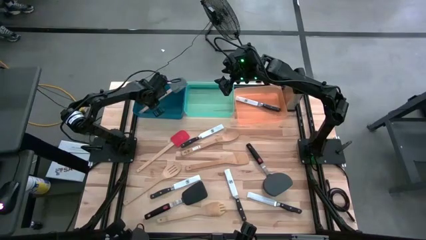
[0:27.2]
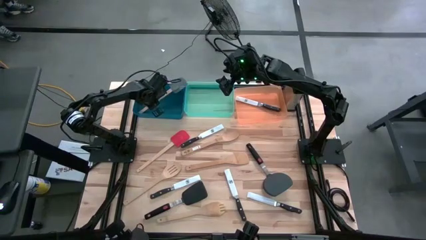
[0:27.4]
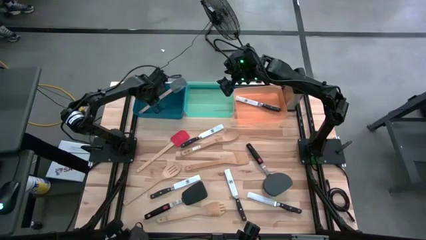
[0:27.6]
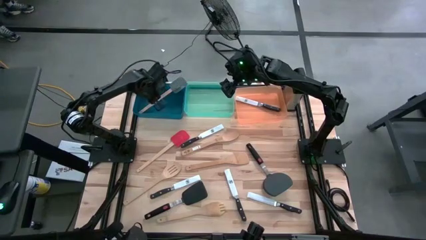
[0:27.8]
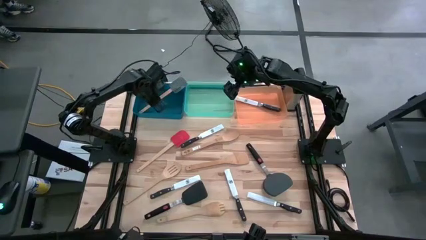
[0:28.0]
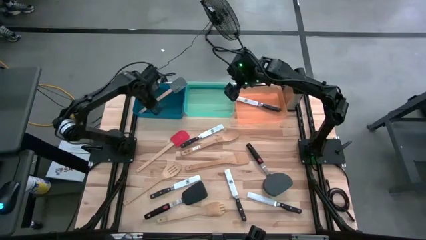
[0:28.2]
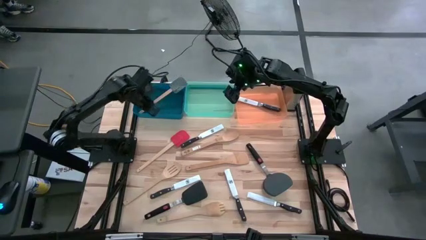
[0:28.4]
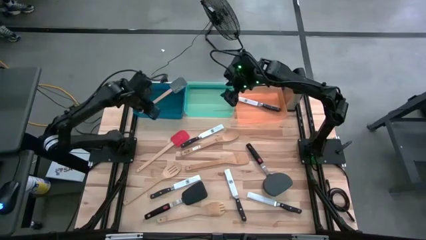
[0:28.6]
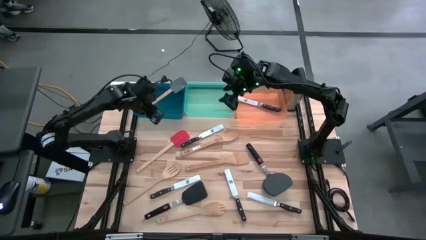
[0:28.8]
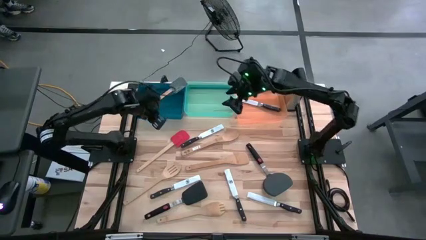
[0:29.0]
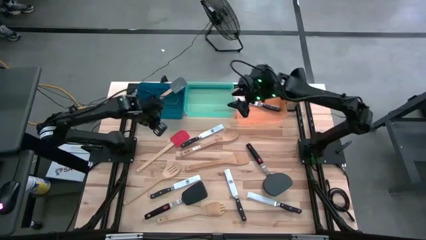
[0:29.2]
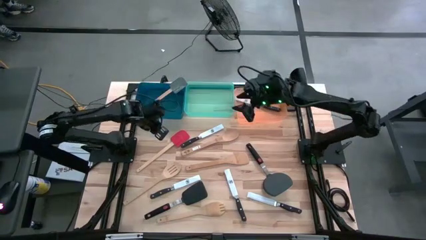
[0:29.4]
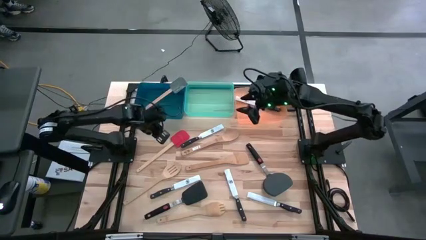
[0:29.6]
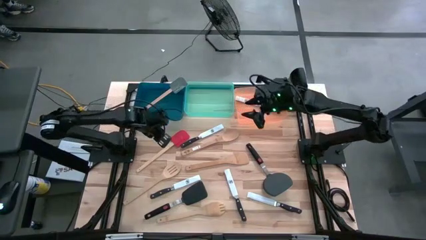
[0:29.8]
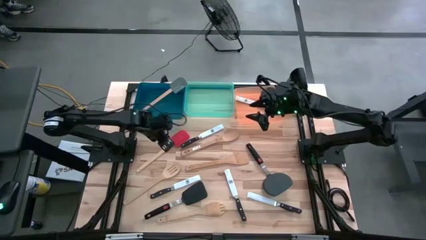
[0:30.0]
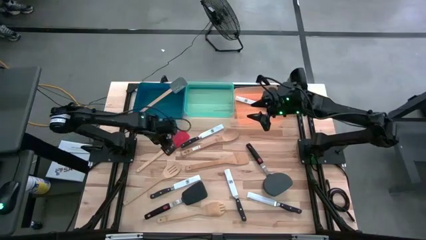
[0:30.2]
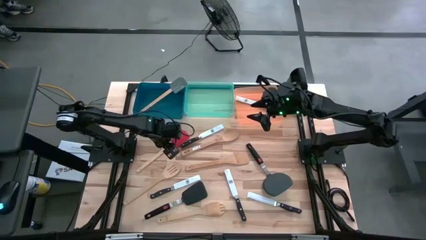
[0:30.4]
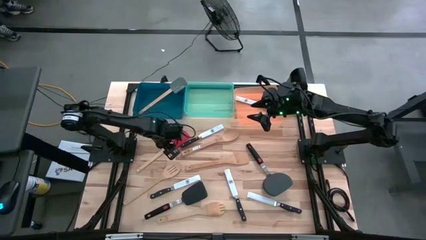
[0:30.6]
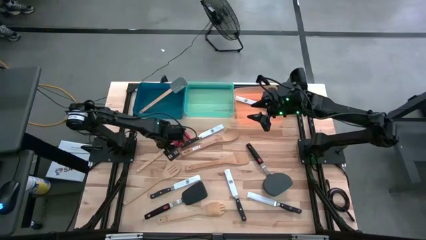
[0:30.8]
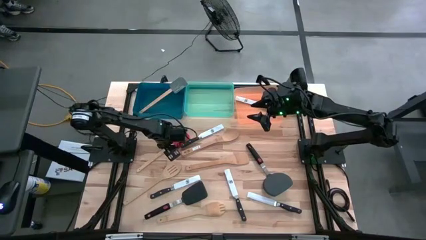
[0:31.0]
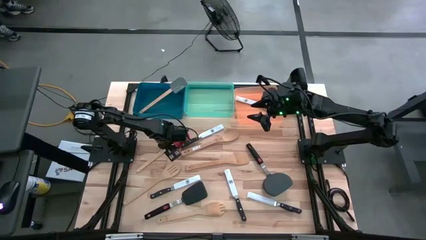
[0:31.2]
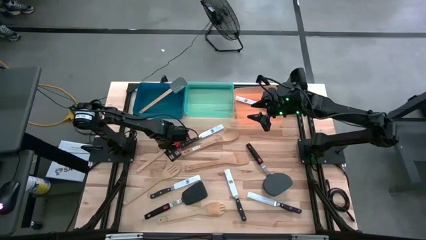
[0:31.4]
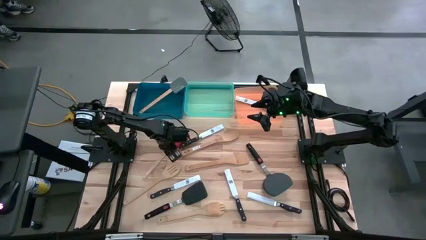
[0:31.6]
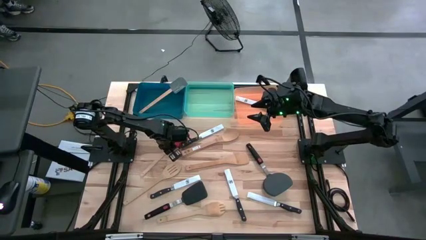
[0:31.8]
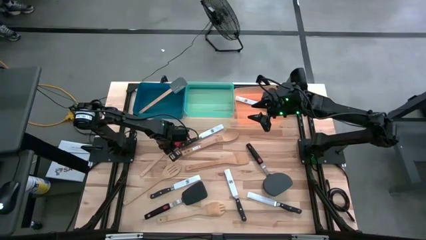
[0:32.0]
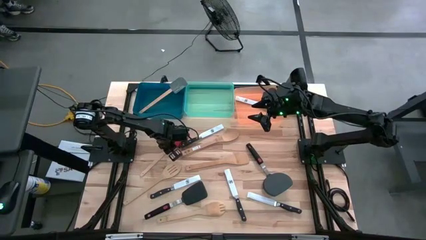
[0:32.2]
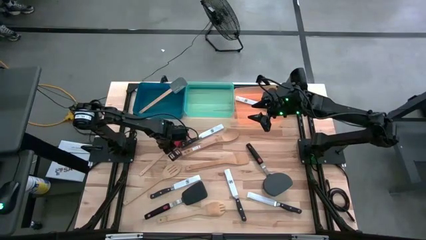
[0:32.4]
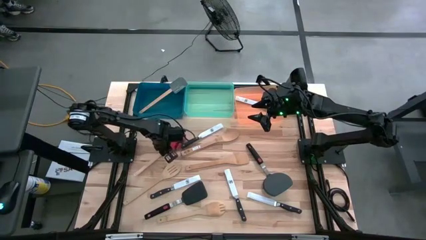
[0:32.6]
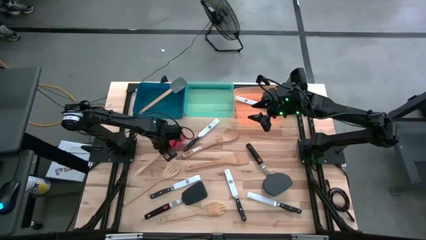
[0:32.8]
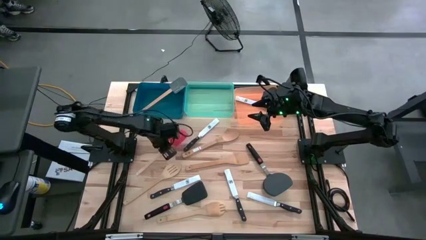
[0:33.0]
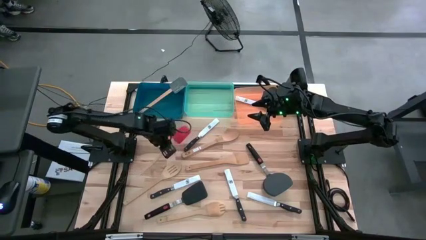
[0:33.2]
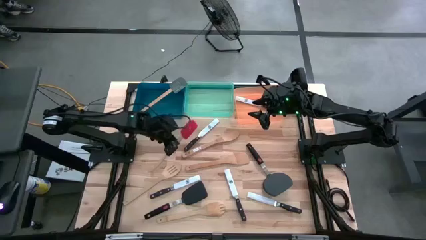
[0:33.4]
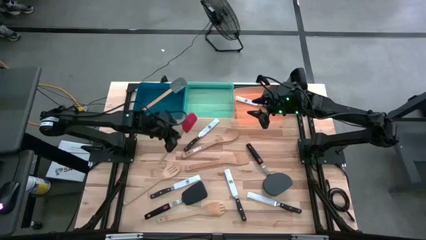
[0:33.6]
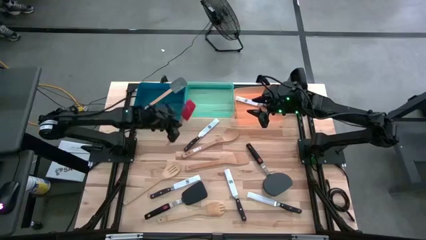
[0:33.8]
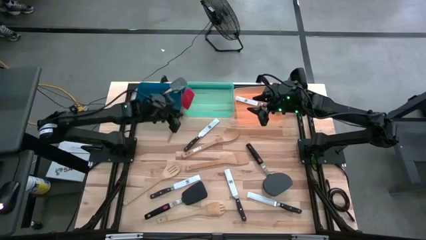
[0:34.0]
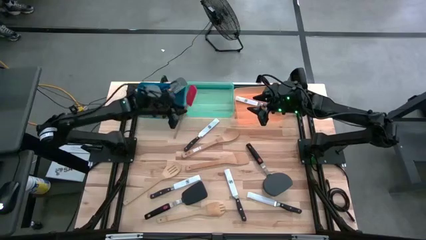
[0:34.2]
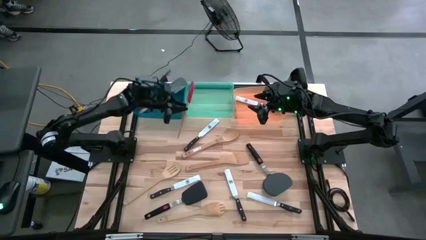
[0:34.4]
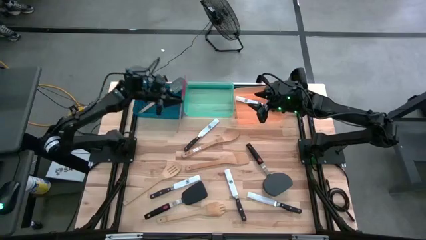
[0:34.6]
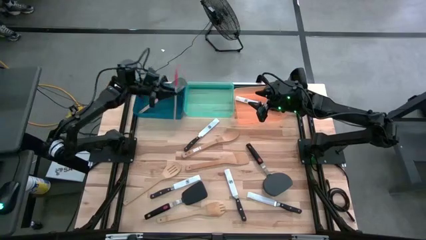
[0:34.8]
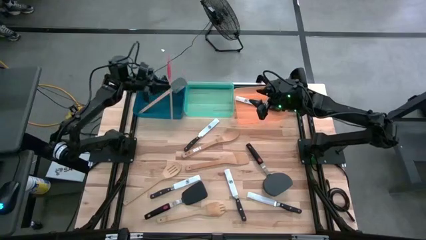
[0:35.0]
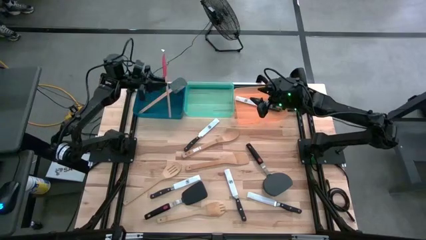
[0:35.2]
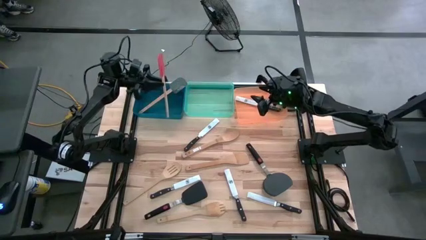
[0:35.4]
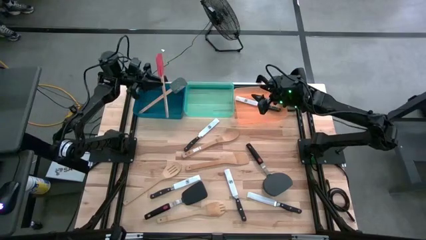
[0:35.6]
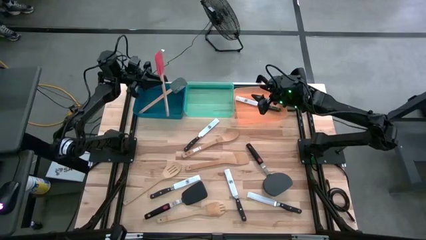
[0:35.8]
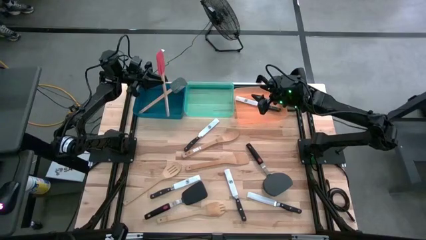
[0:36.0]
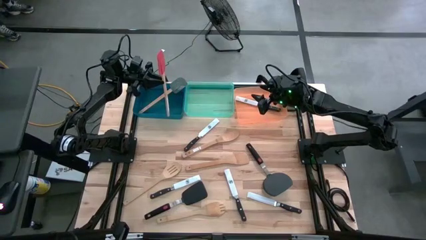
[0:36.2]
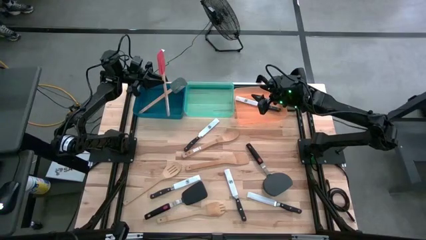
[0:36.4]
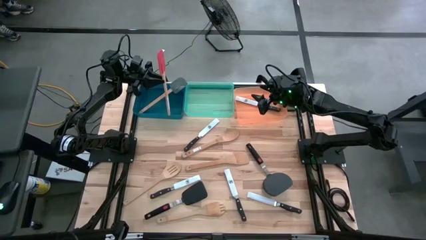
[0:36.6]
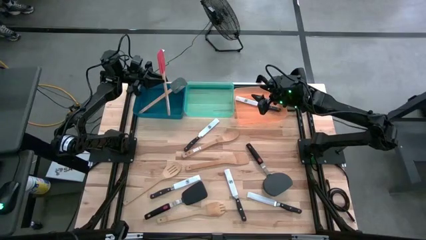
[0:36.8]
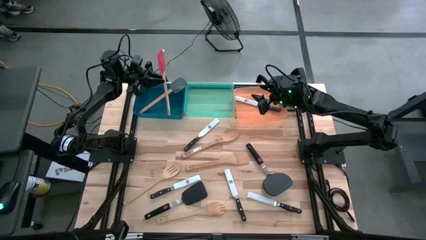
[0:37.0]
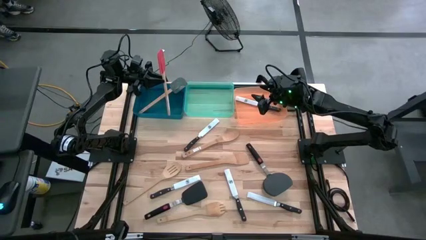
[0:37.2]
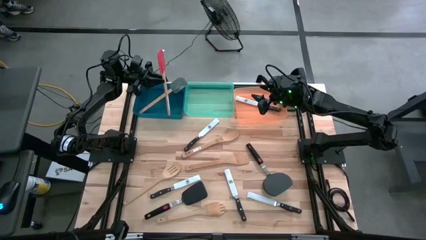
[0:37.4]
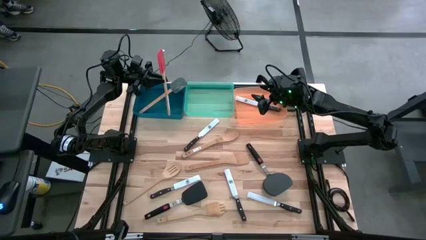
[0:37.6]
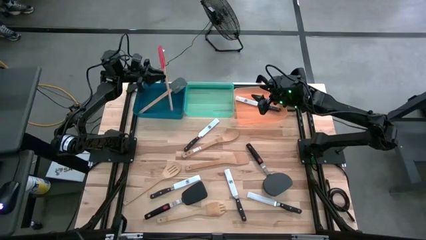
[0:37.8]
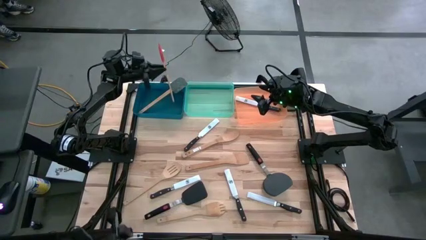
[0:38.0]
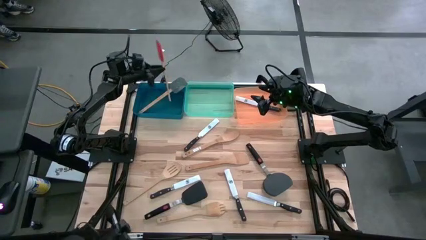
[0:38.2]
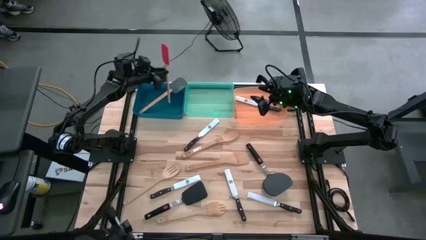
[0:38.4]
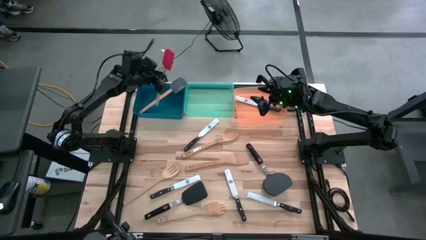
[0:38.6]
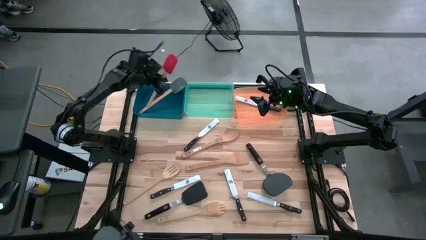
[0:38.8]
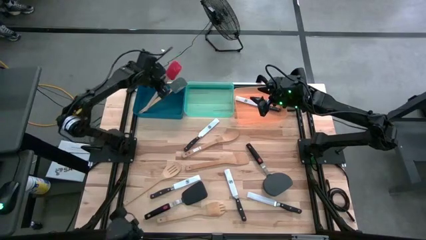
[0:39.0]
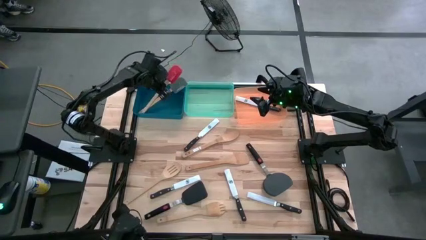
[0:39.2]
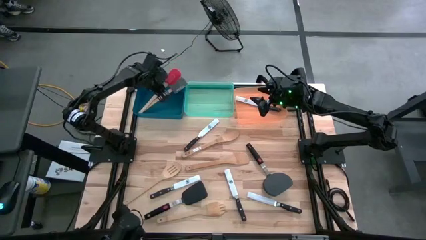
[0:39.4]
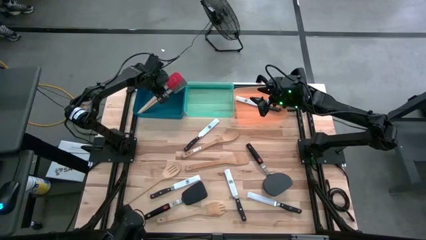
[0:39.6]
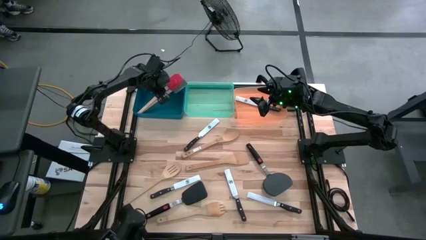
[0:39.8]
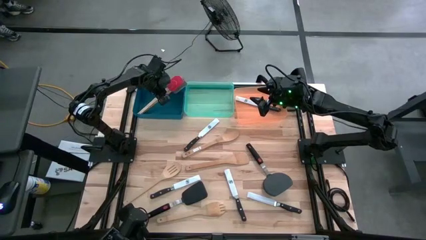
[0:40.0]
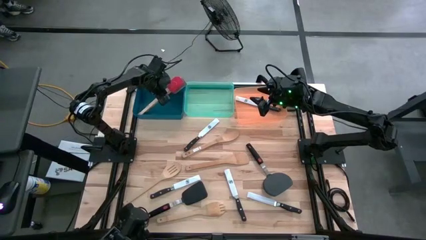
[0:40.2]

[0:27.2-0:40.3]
Task: Pick & Place Kitchen Items
Put the red spatula into the blue bin
